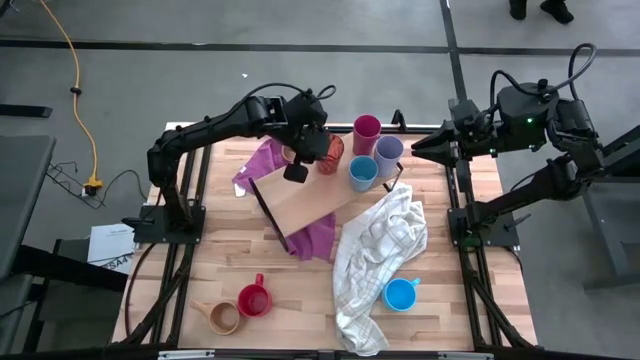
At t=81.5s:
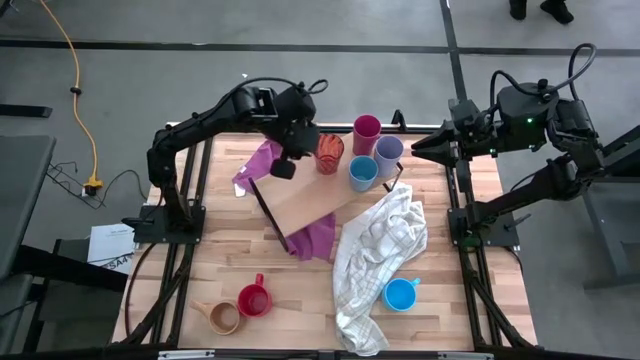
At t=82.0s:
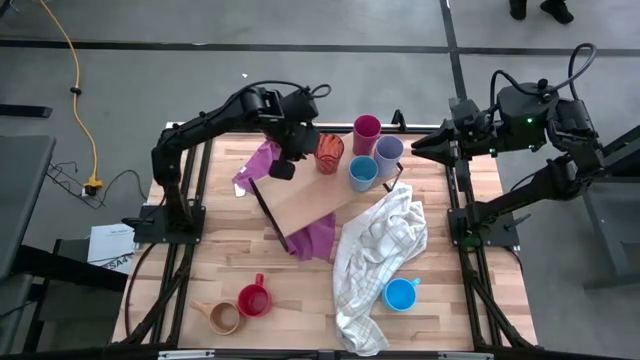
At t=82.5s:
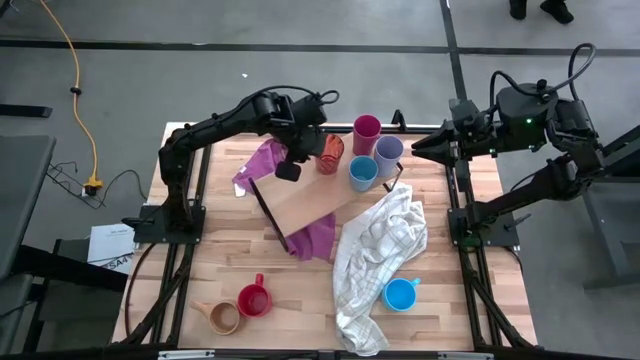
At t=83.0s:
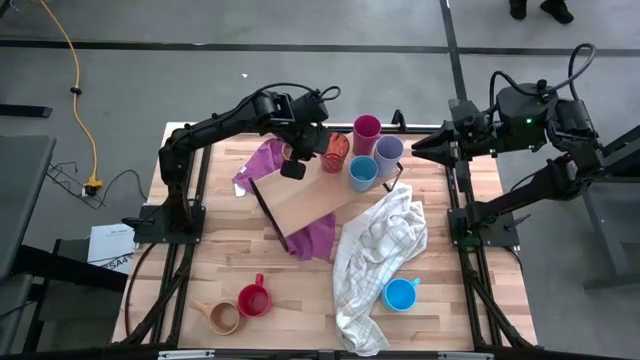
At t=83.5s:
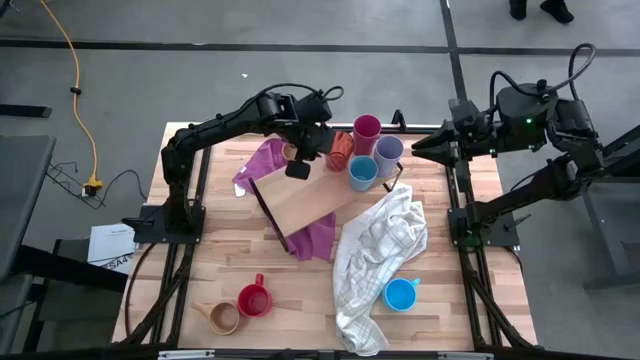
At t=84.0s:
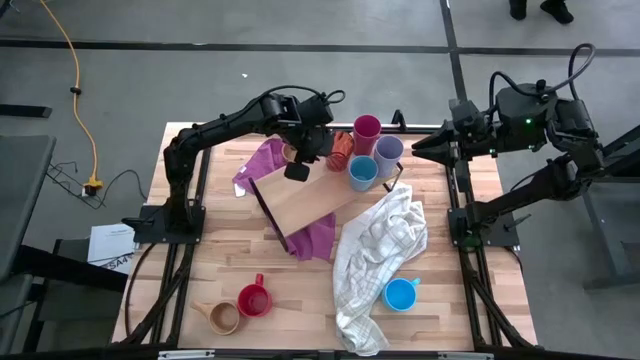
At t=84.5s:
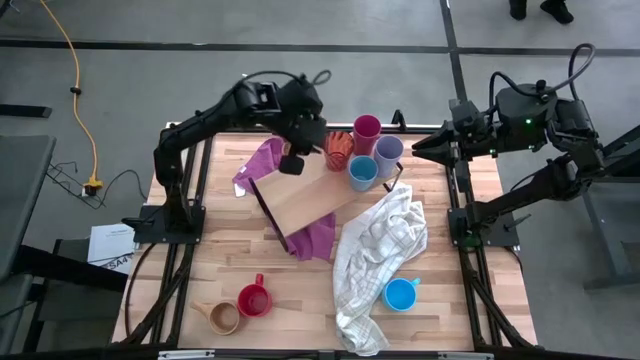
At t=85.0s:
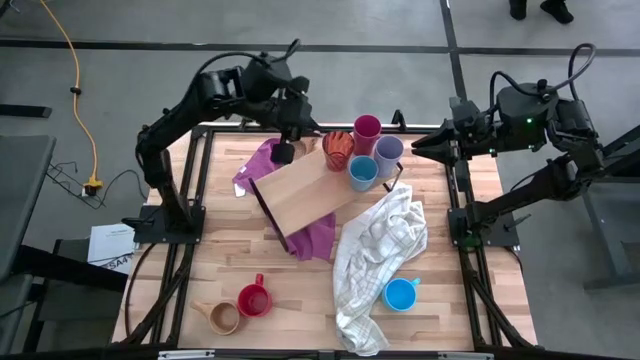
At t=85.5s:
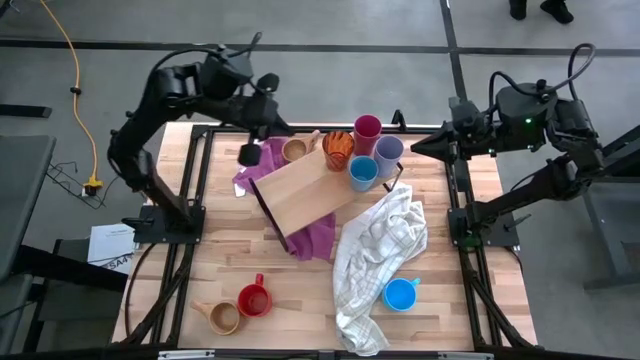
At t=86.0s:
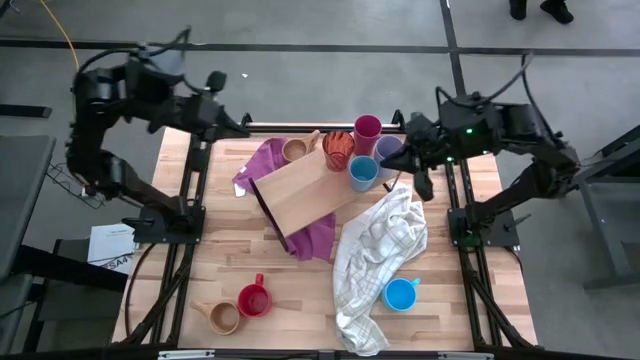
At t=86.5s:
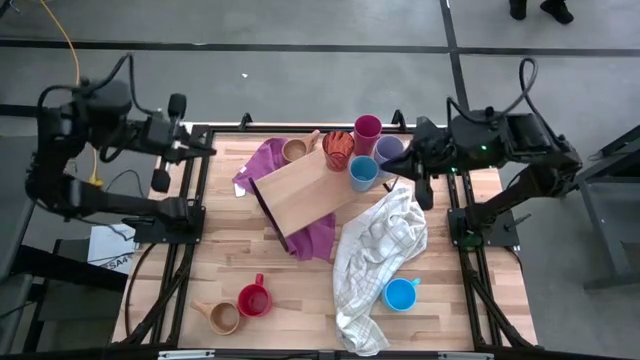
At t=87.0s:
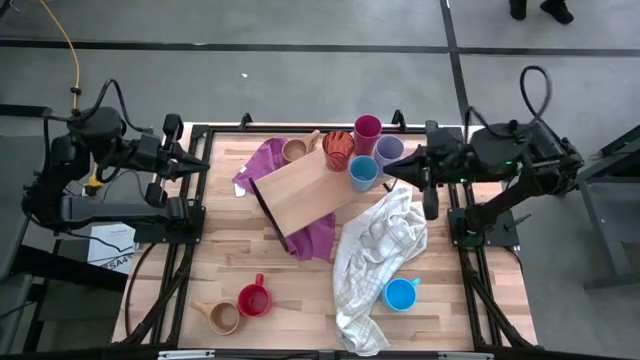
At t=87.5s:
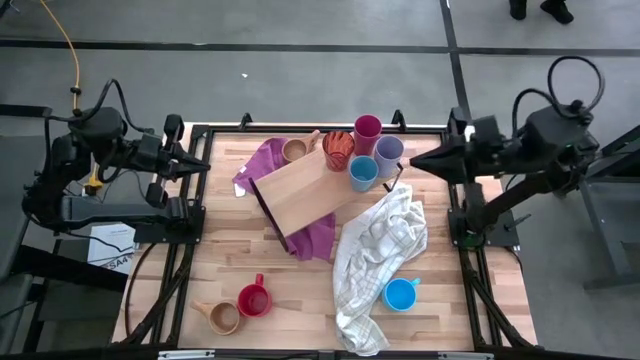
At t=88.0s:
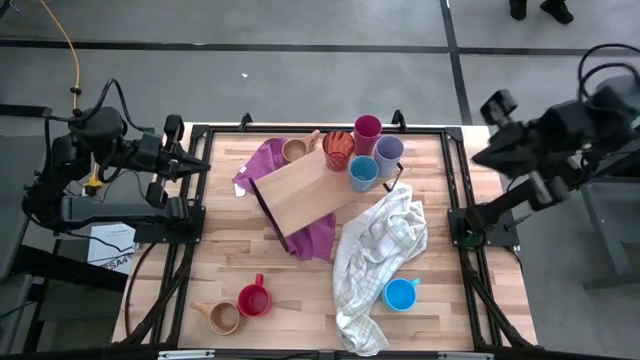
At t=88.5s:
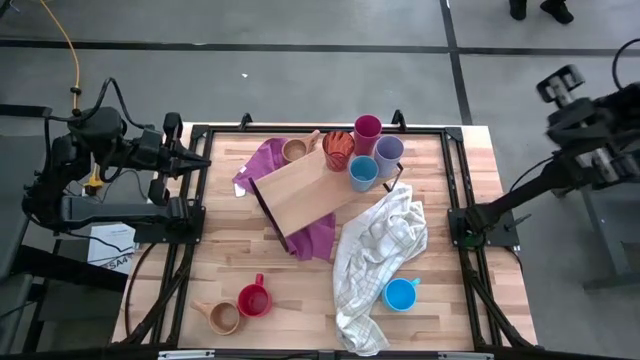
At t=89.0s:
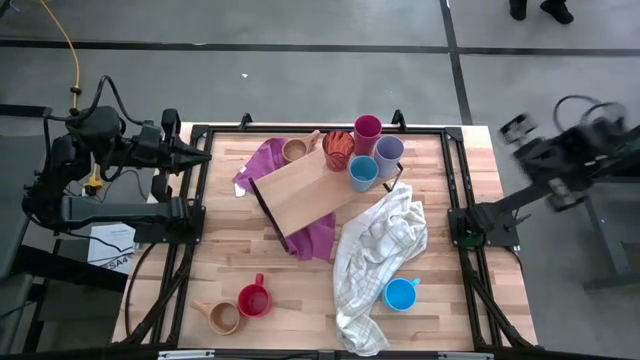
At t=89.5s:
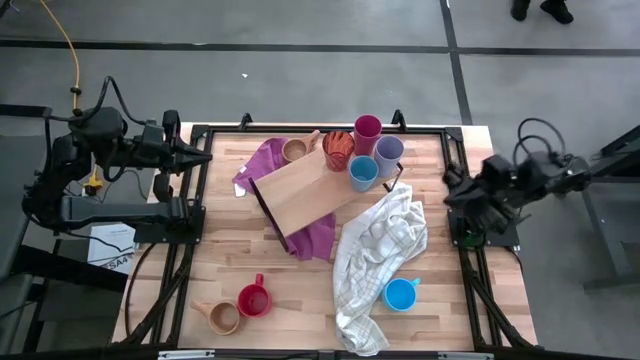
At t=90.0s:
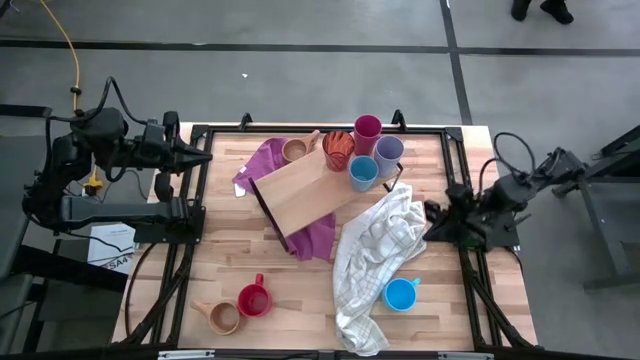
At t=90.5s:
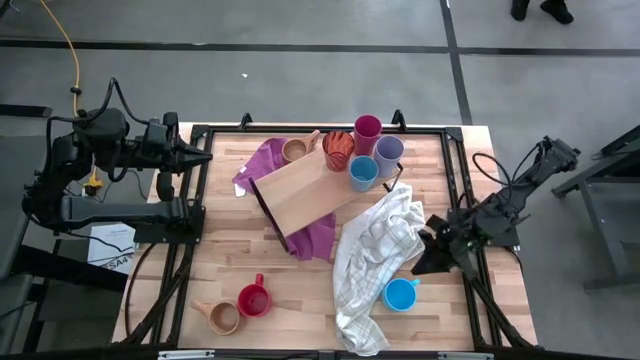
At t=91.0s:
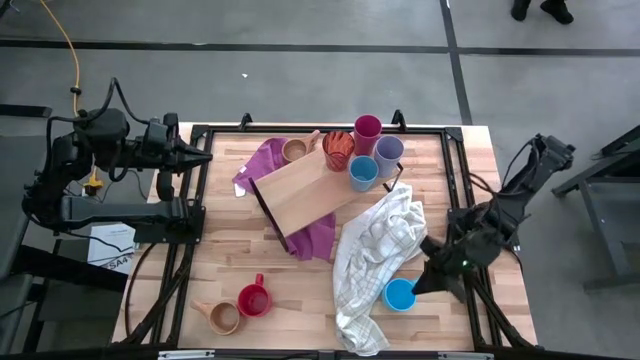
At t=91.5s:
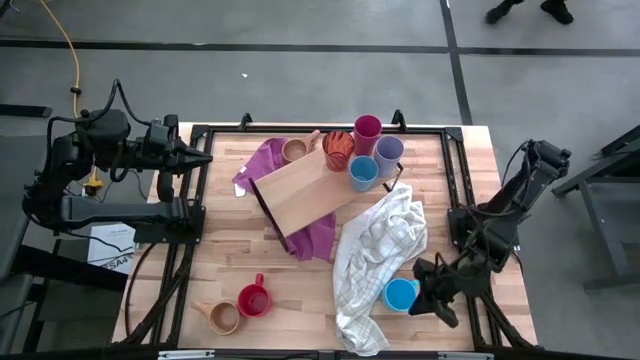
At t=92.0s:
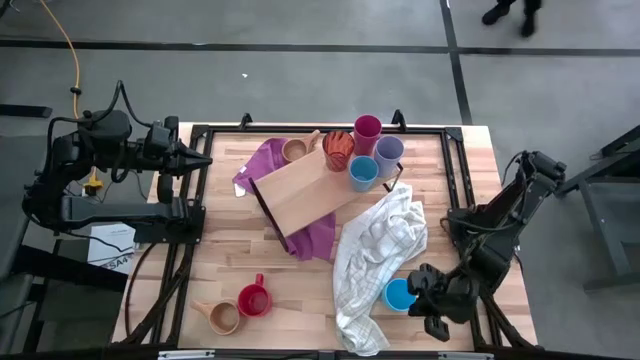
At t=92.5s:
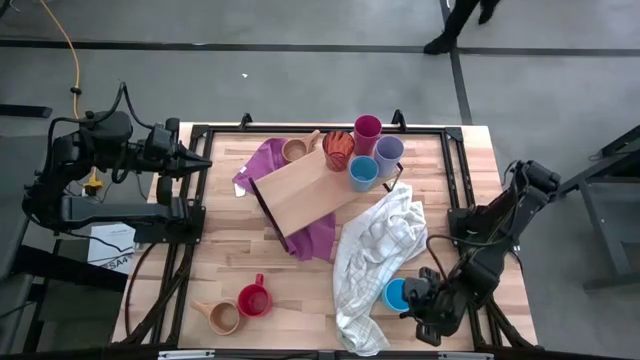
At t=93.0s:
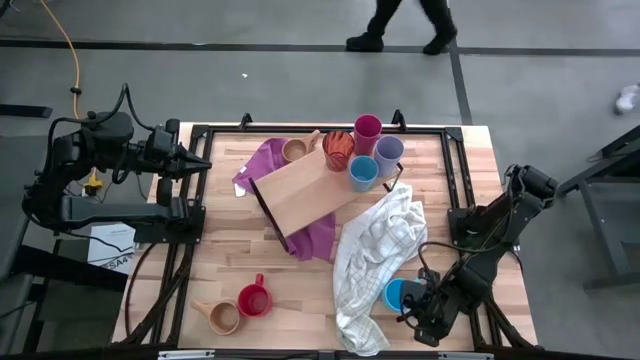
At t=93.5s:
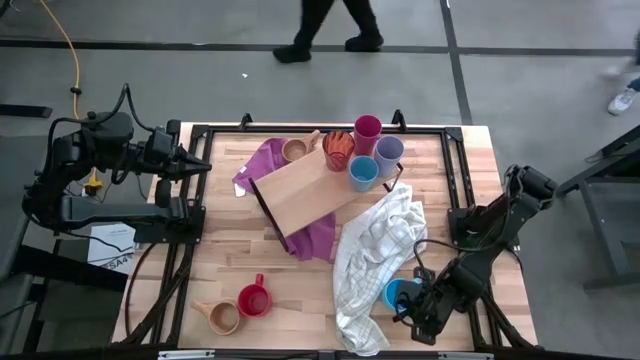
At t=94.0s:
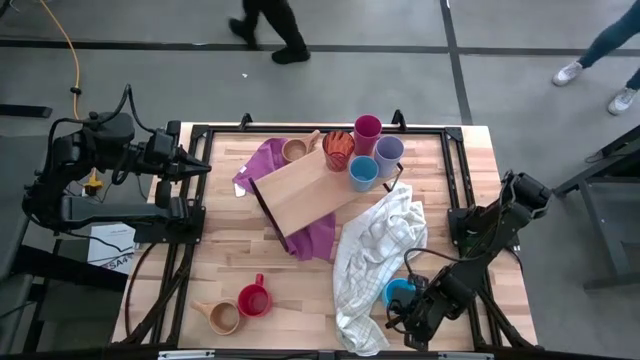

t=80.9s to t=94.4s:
Task: Stack small to large cups/mugs on shelf
Put the light blue mug on the shelf

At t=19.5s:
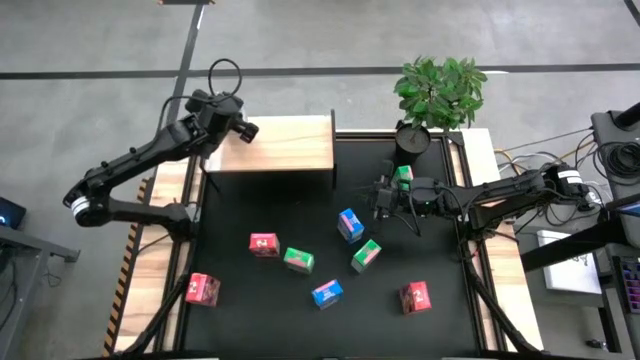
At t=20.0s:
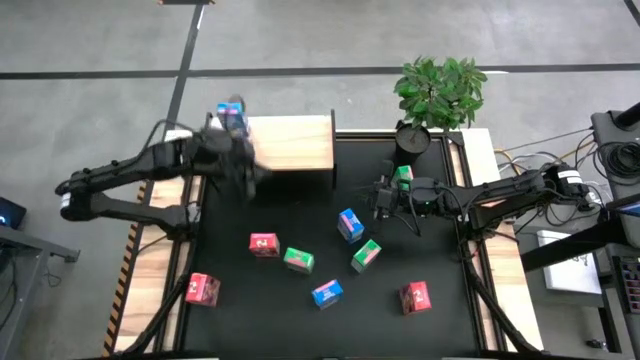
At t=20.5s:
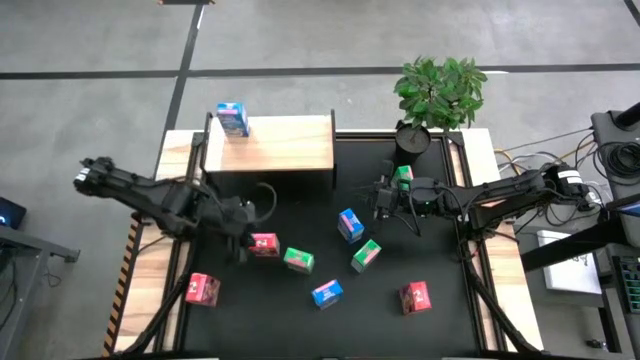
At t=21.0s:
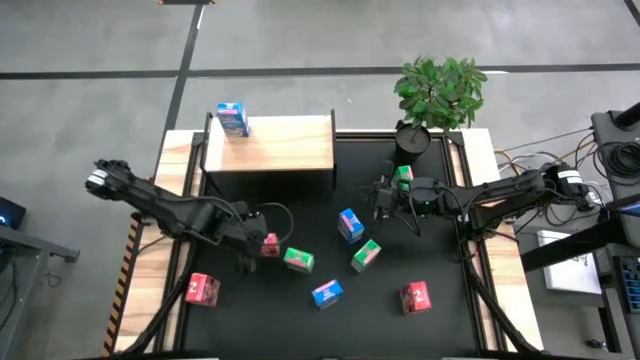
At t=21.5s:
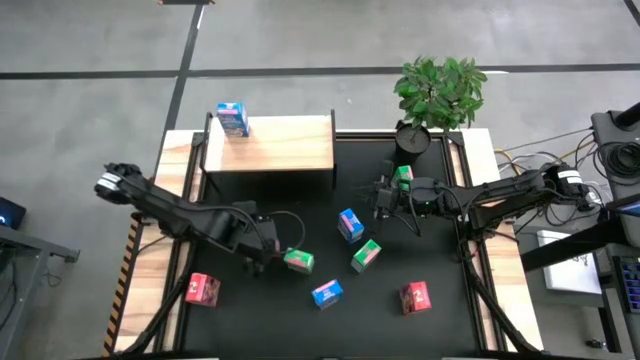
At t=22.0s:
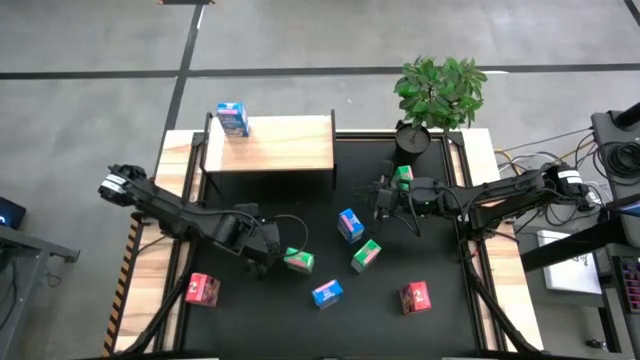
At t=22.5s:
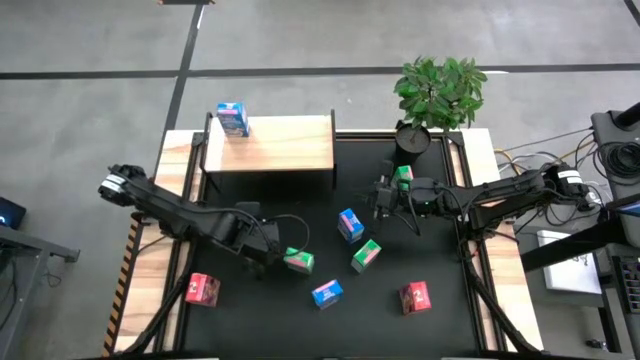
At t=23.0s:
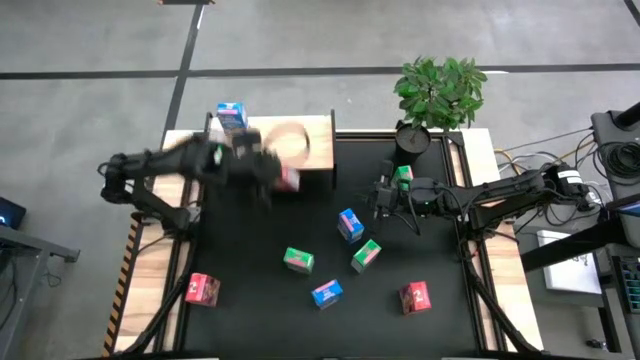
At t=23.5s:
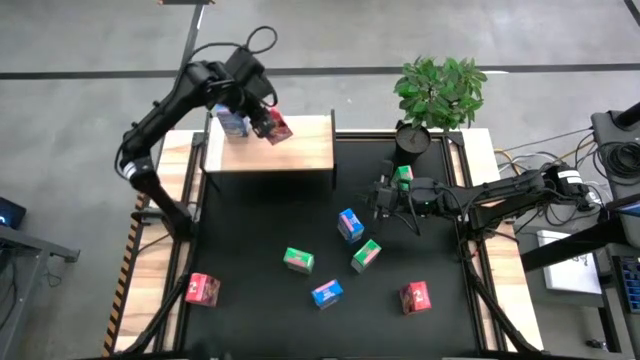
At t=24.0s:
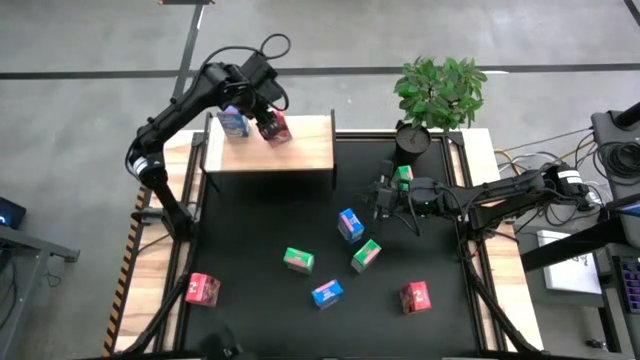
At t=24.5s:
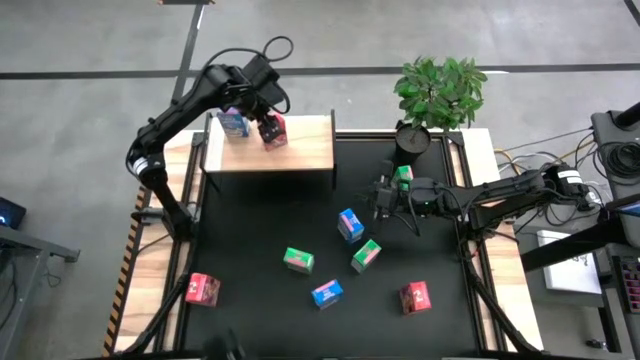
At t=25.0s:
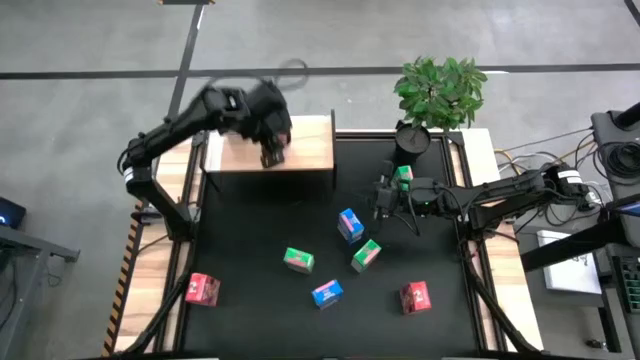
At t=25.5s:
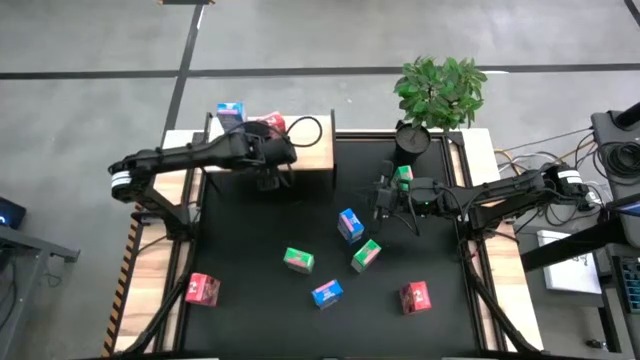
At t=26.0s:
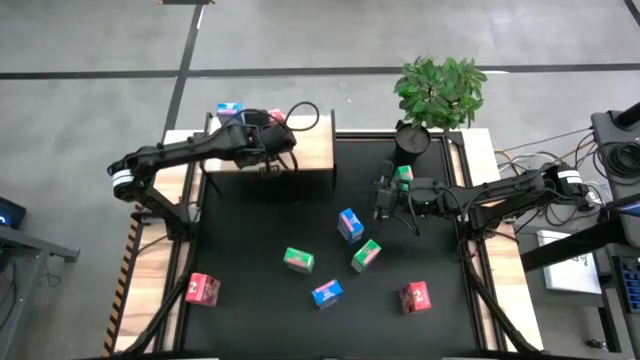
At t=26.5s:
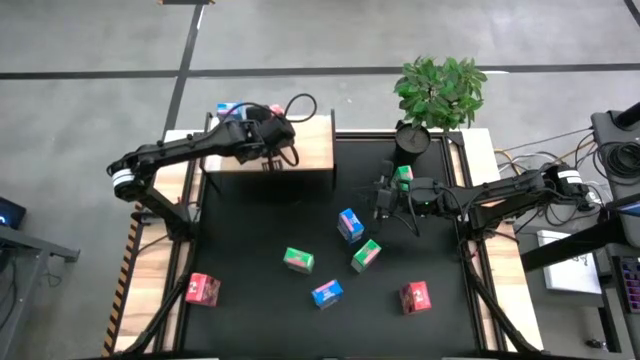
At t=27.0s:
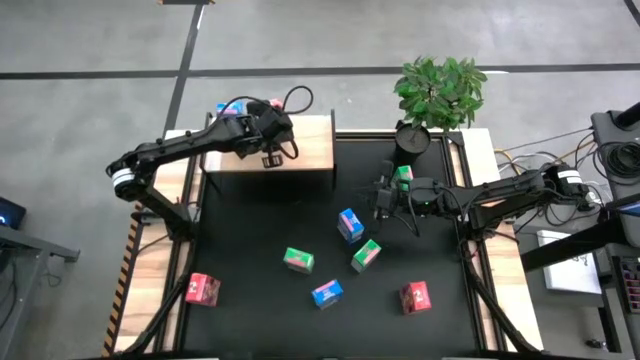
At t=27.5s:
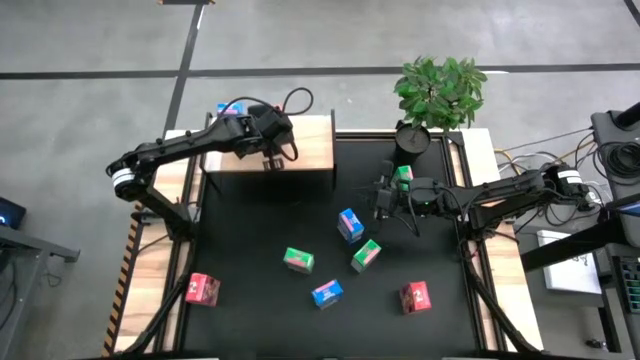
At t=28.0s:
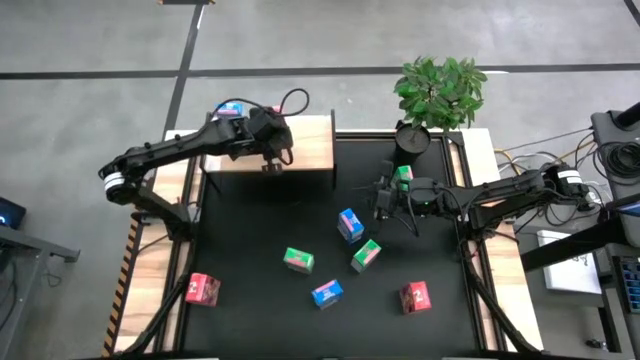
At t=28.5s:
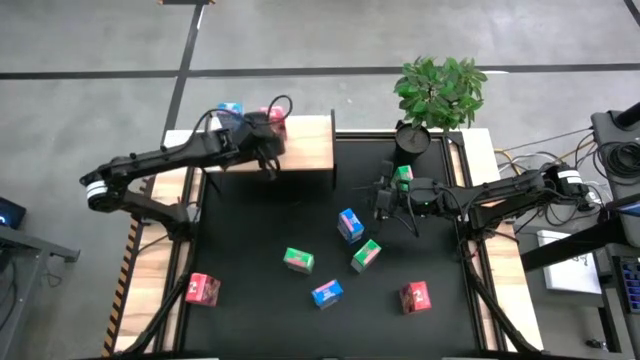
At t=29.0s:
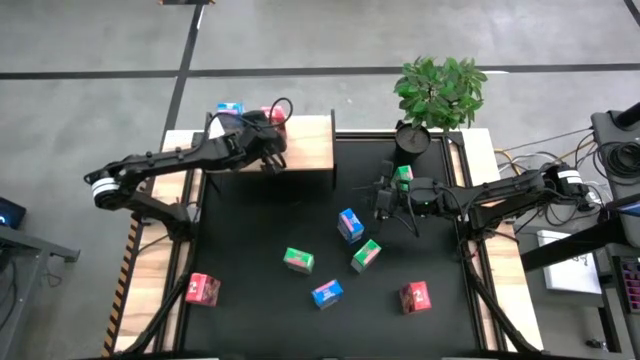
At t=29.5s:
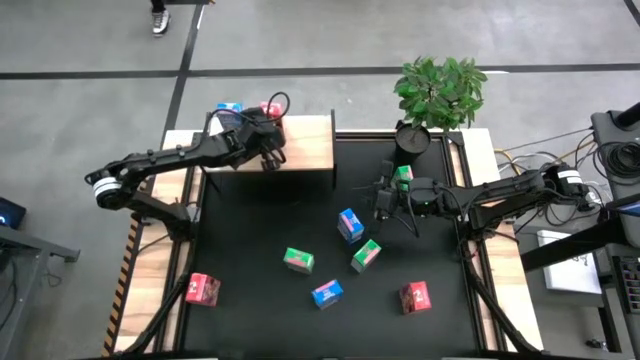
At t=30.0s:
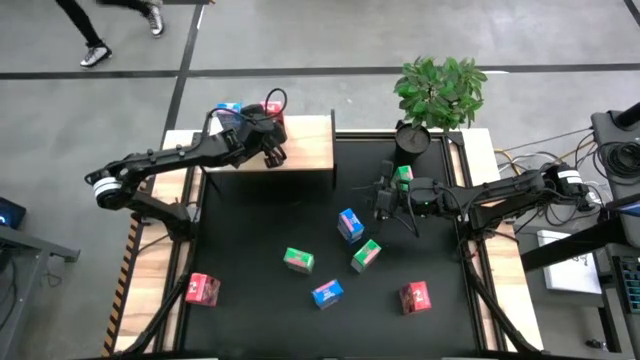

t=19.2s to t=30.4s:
Task: Stack cereal on shelf
Put the top red cereal box on the shelf
